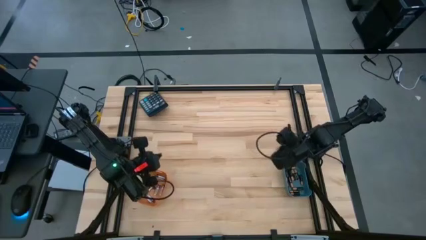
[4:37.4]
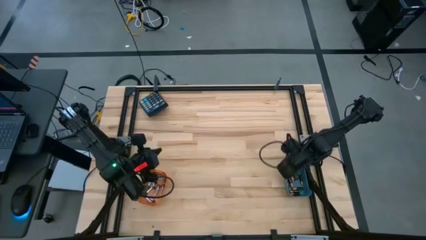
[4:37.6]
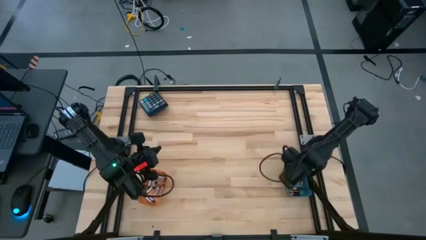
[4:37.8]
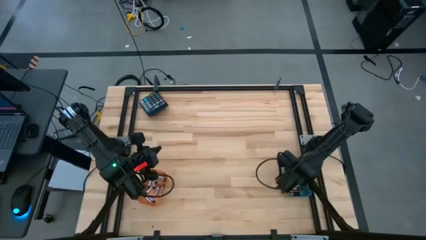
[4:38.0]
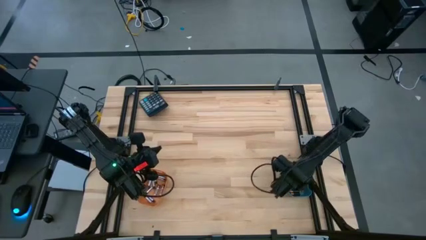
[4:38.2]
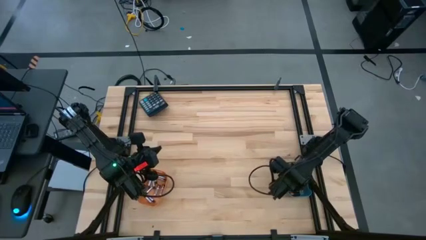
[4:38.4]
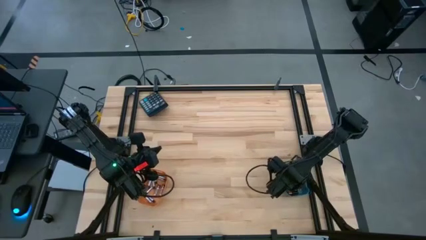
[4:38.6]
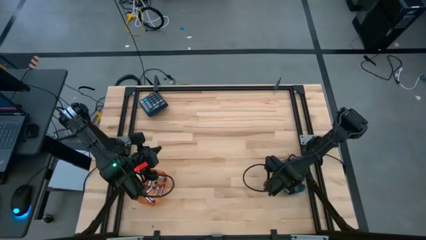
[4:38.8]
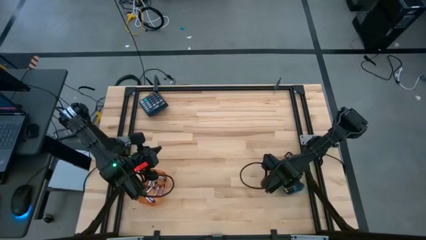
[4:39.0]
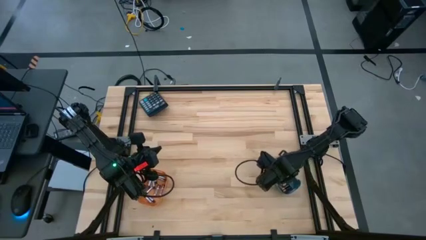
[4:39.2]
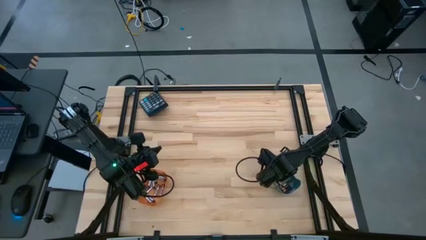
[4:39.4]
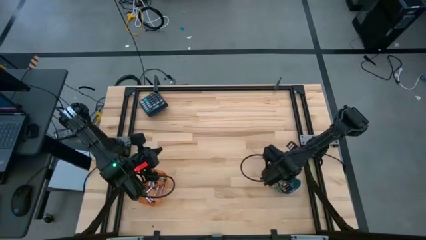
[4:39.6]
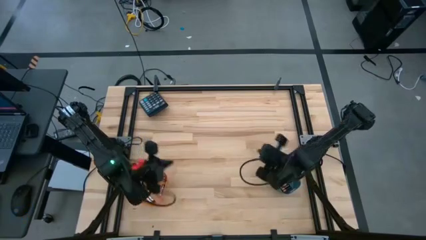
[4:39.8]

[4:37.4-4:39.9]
Task: Sort batteries
Adjust the blue bin

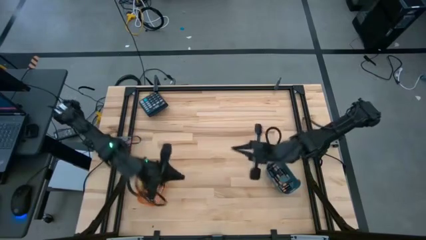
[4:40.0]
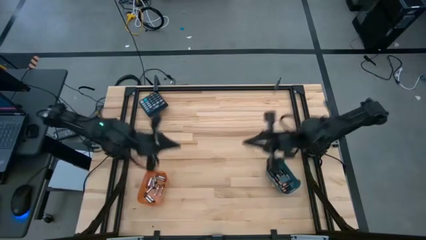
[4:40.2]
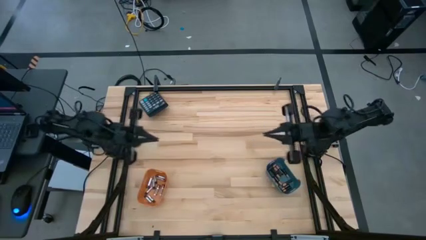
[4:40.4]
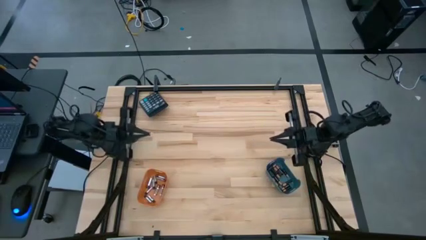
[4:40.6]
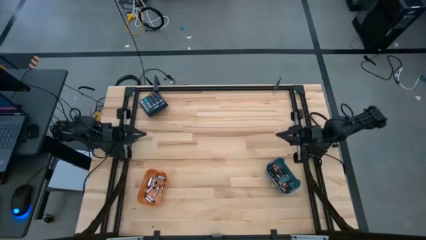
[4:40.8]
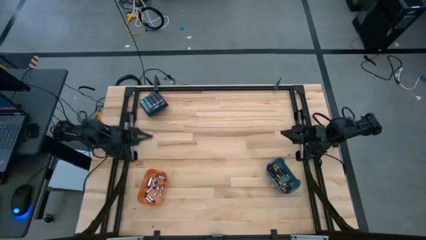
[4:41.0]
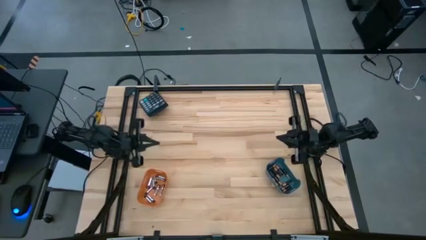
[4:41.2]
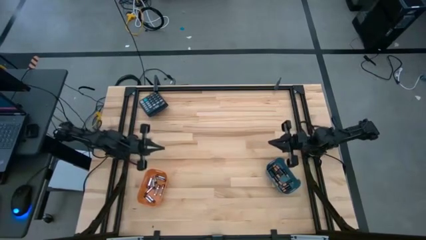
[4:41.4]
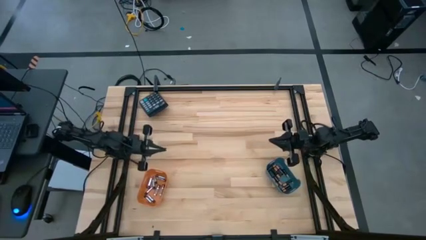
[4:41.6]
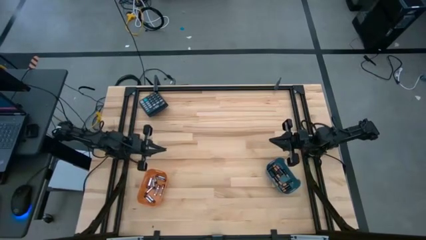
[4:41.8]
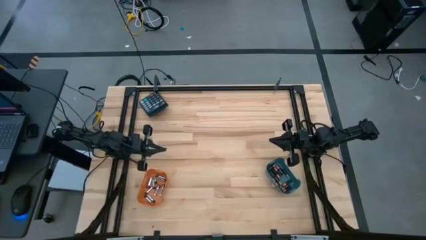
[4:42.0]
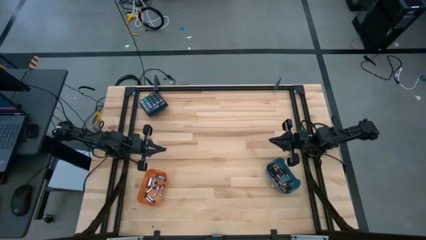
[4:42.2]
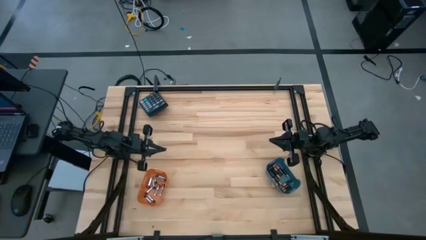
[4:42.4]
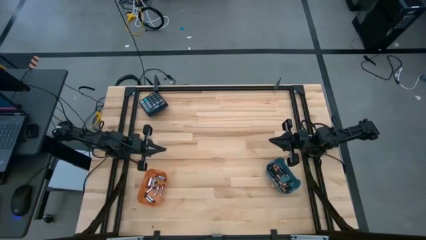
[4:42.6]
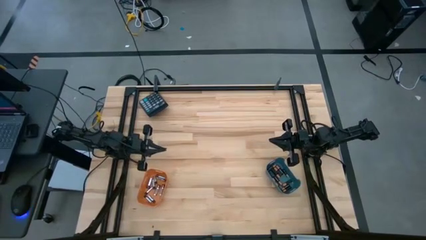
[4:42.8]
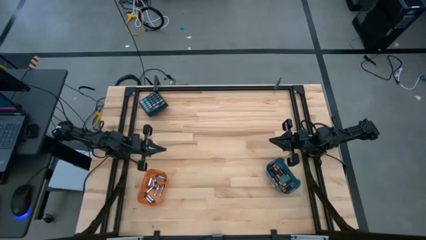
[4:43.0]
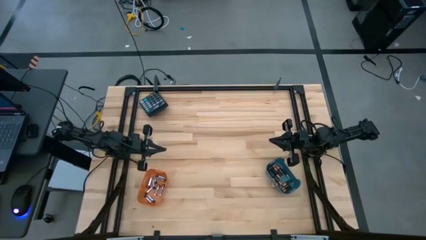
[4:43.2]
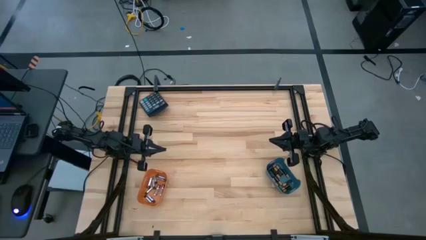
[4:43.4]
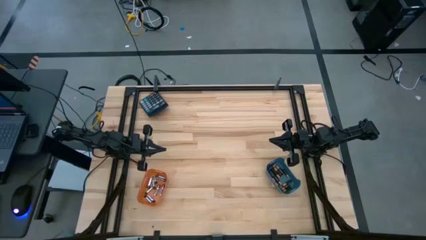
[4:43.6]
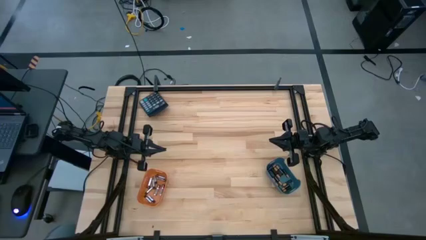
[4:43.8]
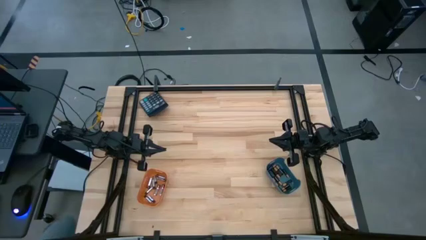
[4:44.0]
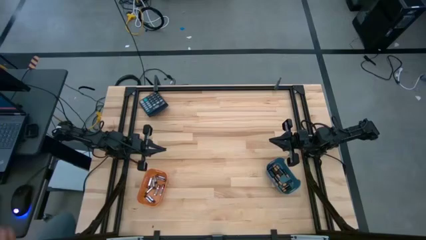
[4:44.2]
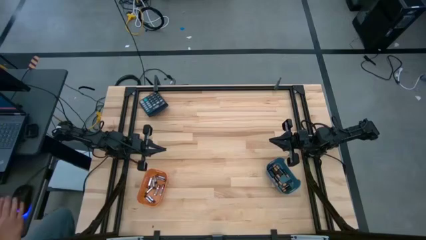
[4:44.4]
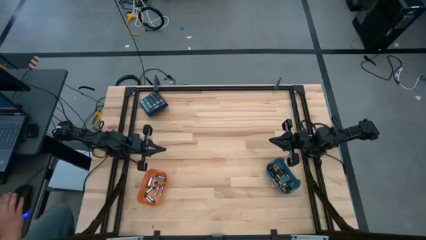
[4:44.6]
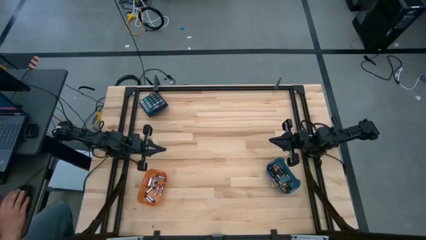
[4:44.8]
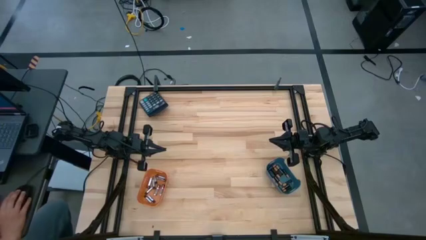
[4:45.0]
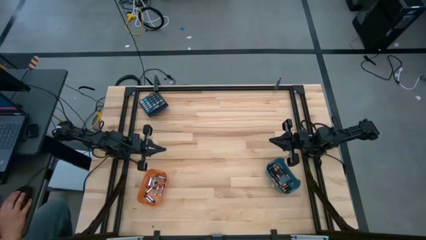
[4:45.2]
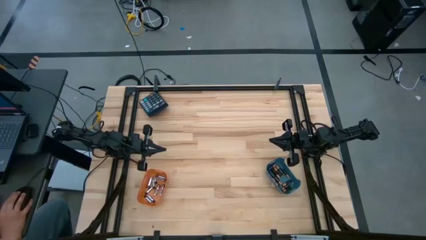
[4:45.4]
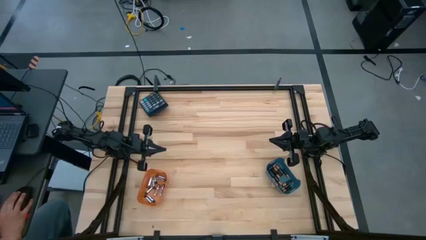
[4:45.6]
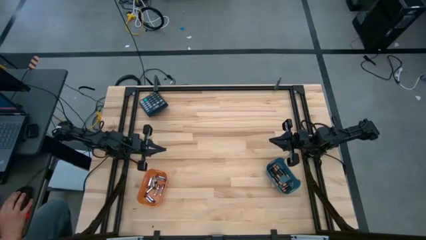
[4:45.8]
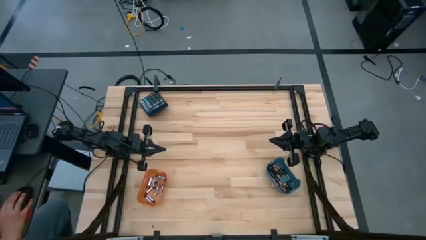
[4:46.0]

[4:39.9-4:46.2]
Return to Home Position

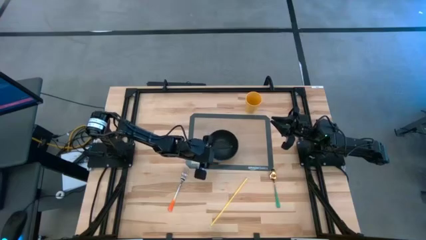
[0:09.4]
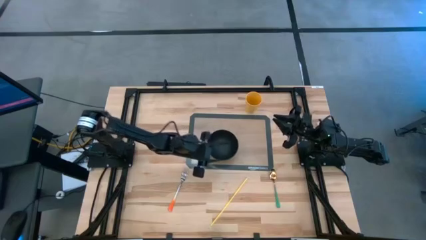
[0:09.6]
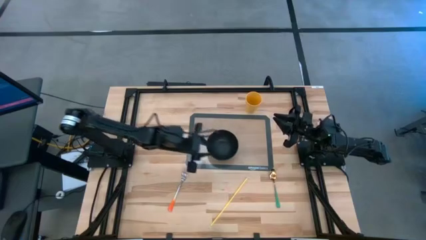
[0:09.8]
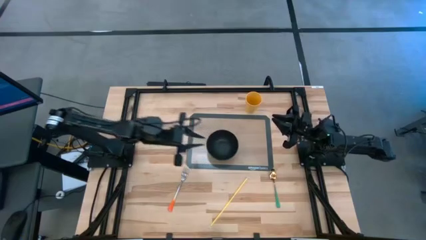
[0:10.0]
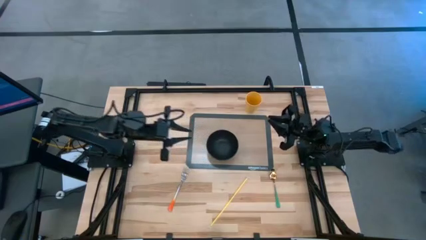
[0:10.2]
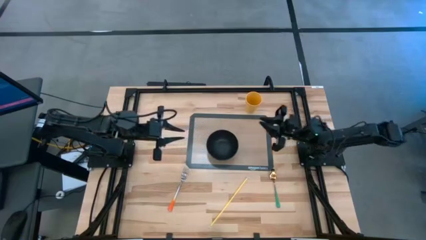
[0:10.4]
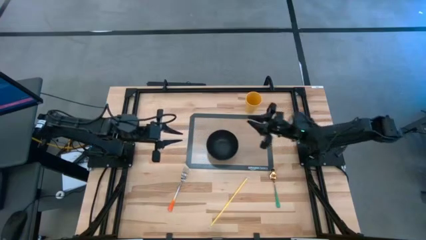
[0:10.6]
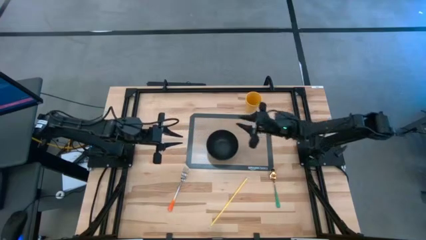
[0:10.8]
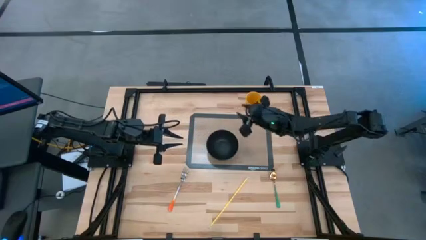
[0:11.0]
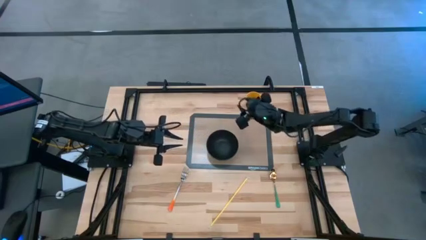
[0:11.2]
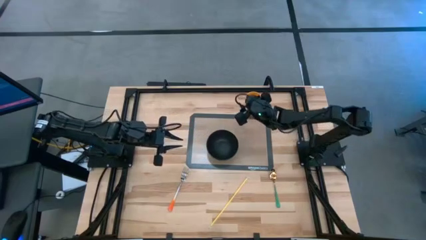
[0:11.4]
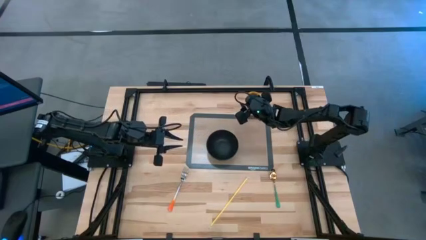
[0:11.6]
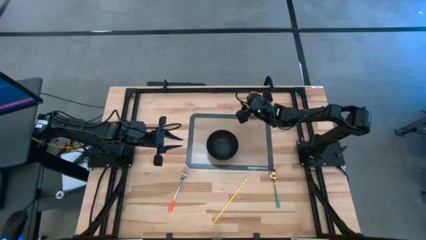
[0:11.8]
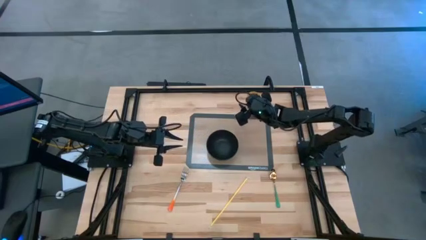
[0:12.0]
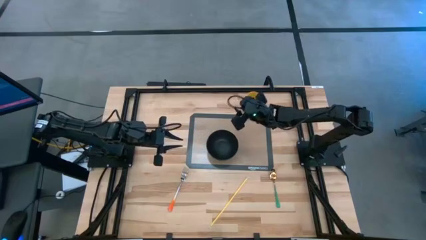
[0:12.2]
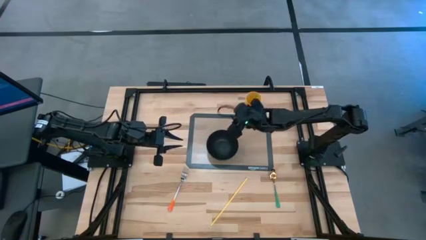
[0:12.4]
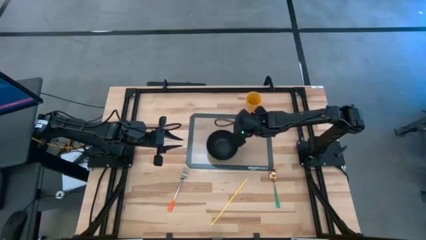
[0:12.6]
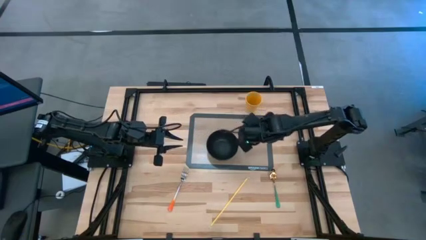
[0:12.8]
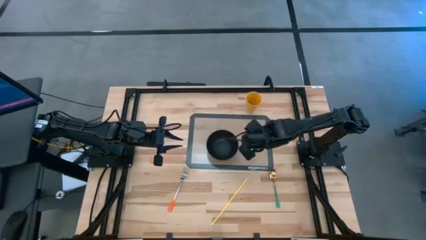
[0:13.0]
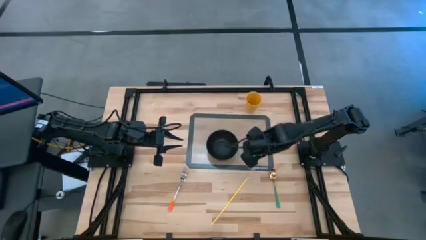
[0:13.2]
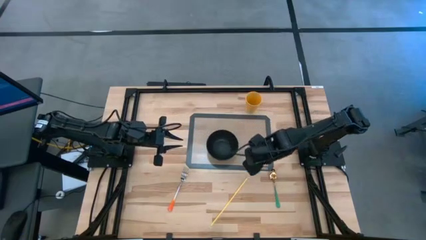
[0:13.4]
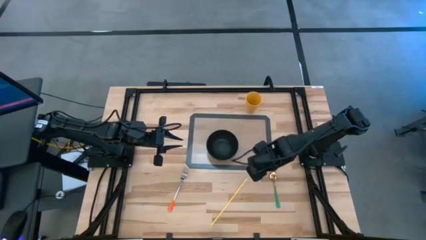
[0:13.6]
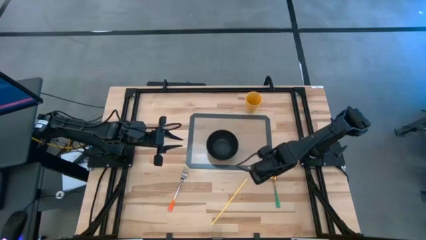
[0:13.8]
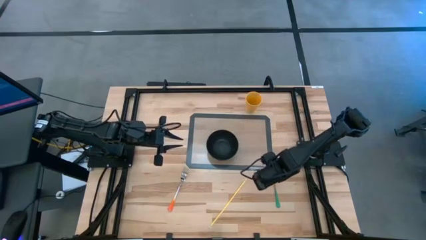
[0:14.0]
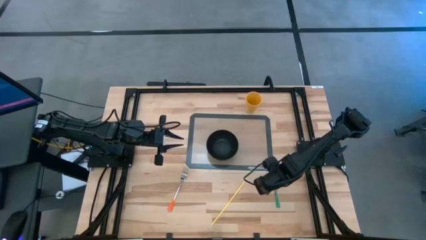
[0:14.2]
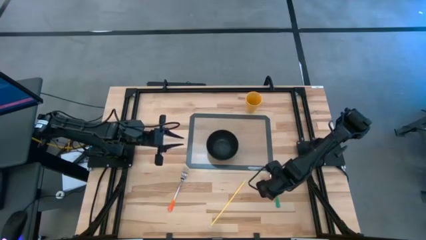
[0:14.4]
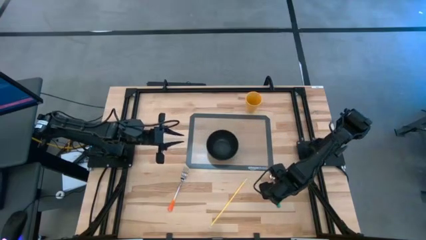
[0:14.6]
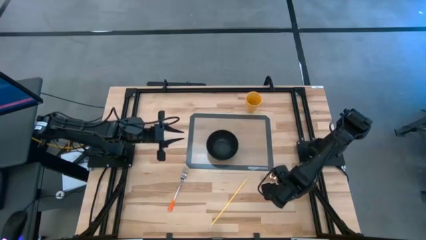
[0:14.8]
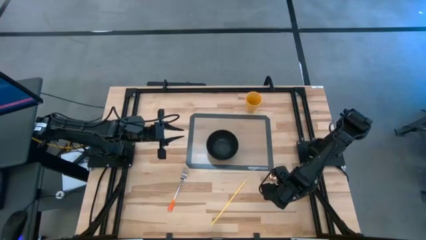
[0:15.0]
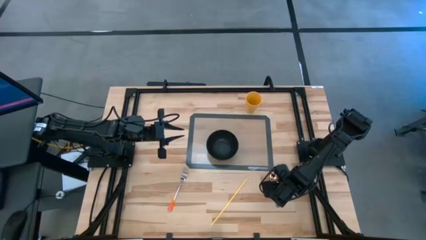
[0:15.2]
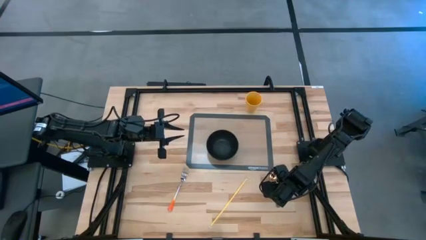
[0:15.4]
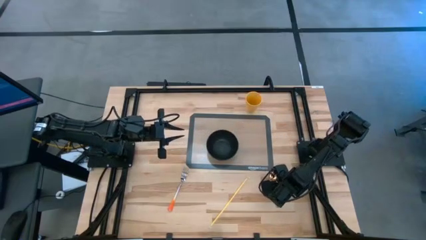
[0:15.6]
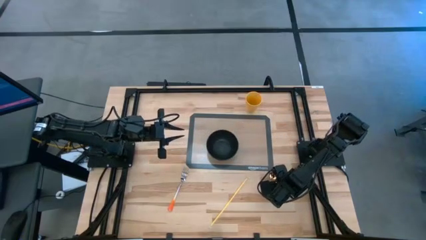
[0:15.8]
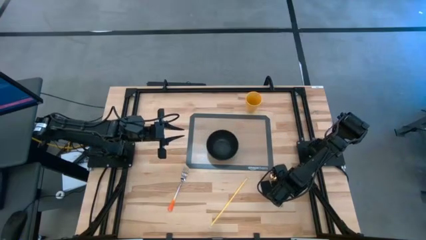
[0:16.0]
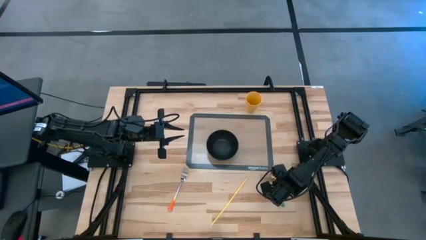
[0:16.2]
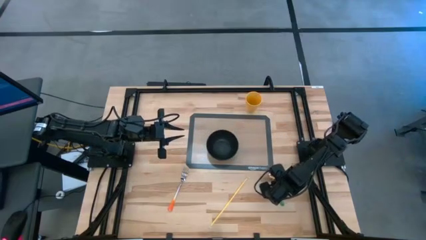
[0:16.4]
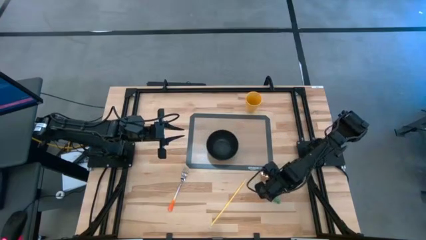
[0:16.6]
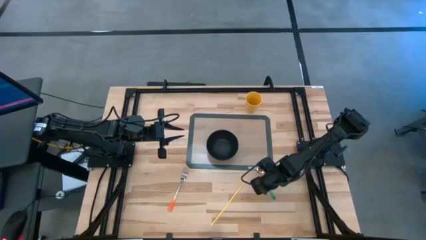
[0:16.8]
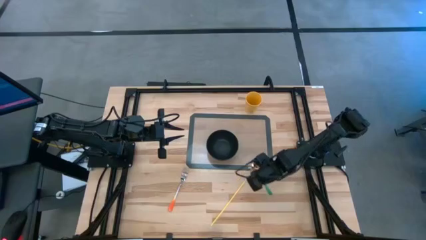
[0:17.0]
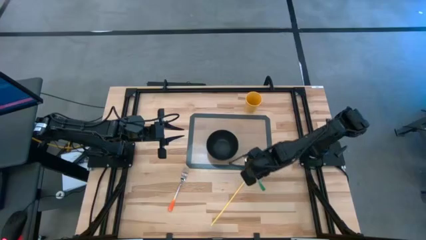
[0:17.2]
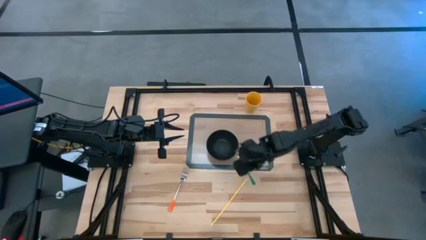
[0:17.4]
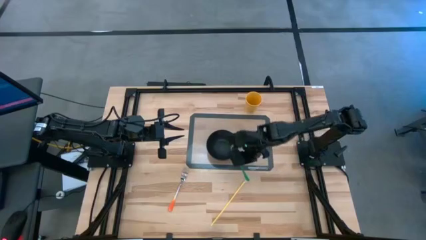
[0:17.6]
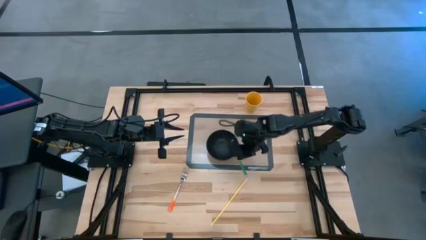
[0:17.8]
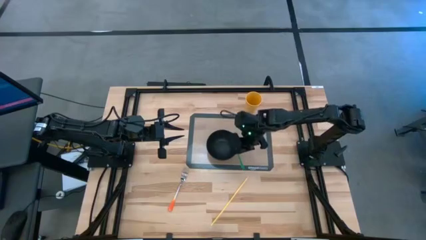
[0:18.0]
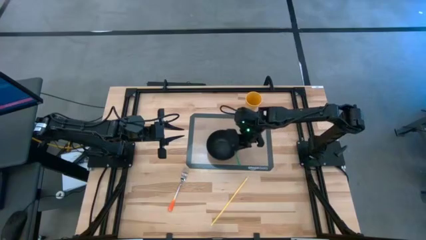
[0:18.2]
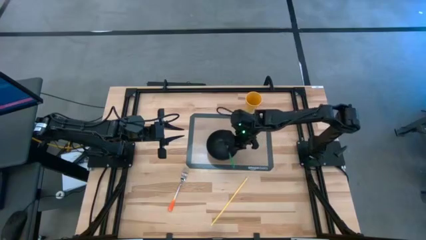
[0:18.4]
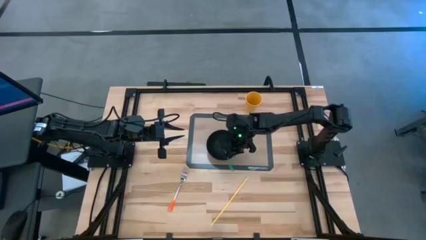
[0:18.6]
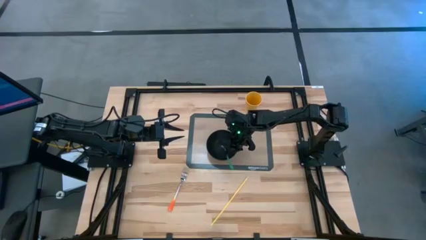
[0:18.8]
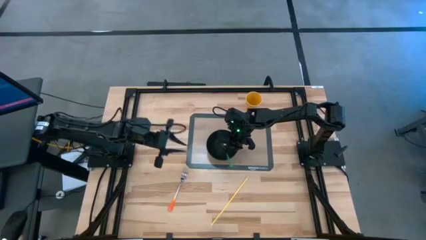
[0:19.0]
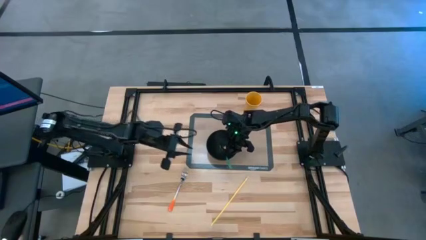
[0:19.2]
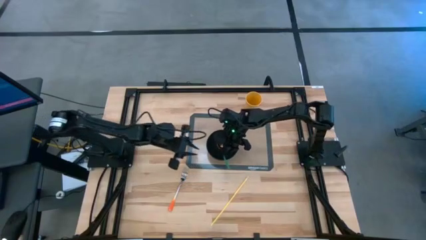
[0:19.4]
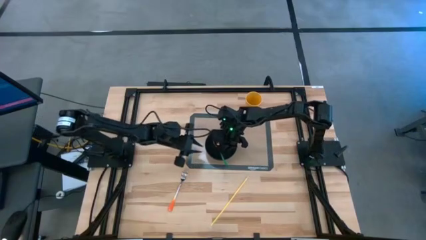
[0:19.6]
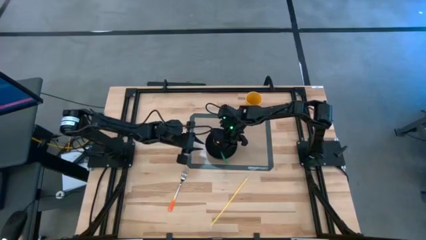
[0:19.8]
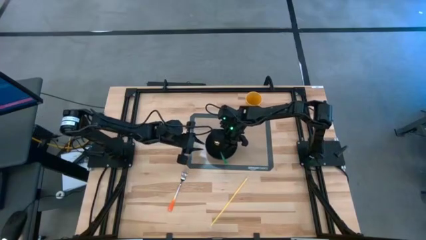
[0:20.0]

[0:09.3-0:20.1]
Task: Pick & Place Utensil
Put the green spoon into the black bowl on the transparent mat
